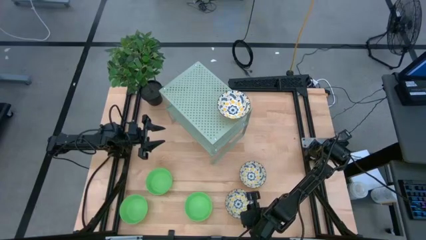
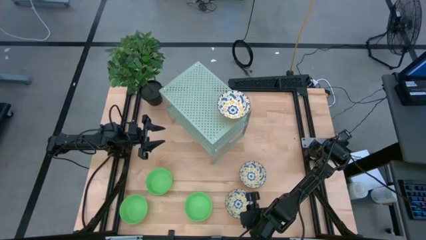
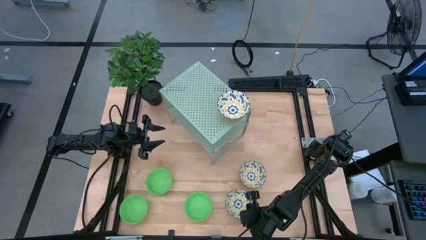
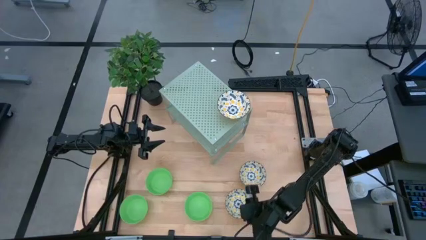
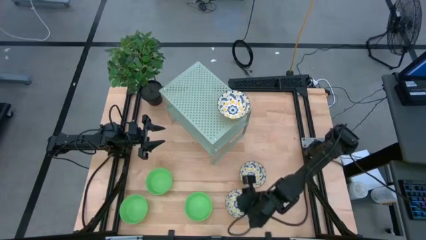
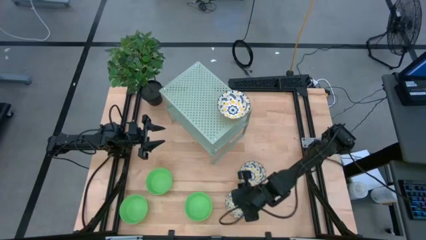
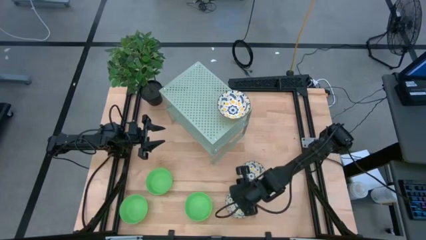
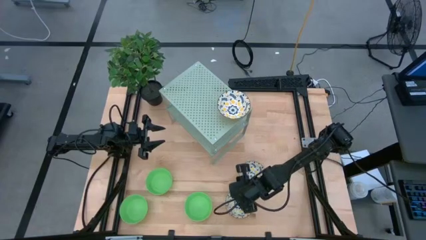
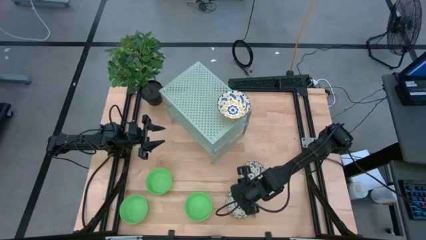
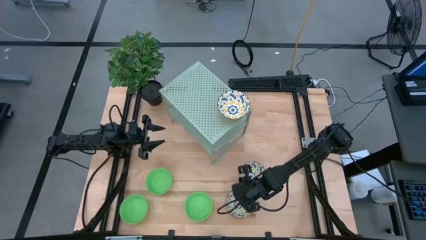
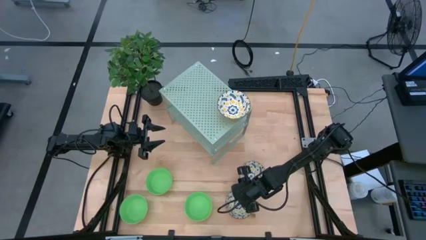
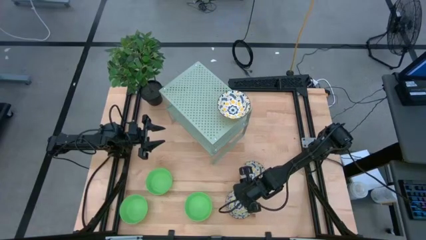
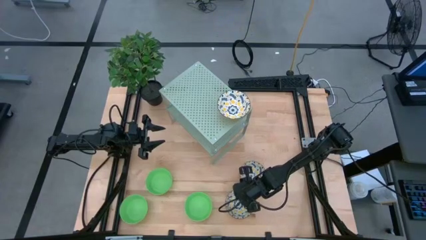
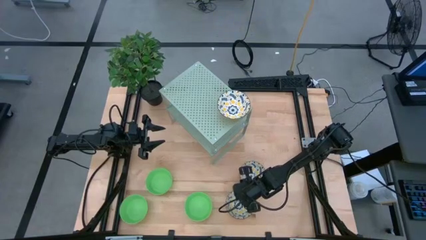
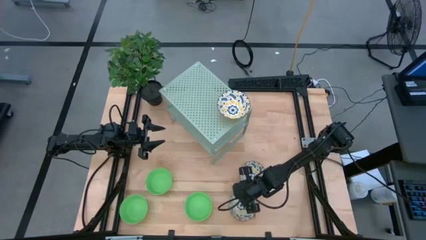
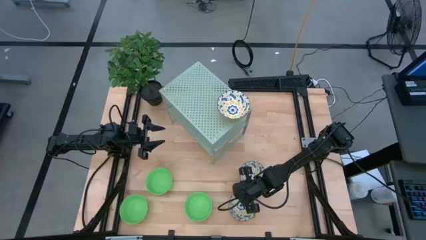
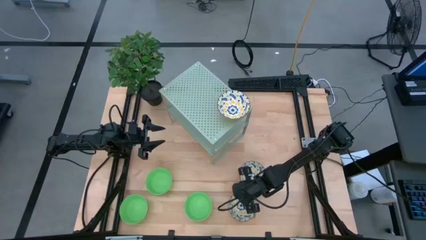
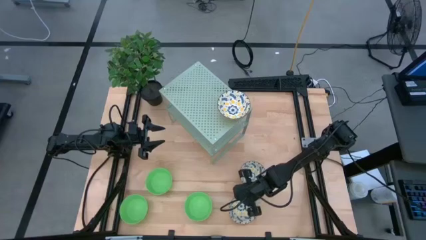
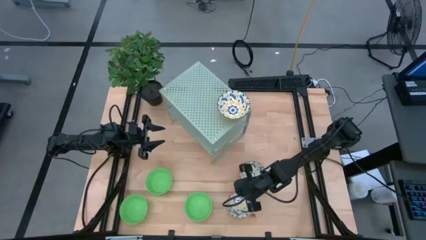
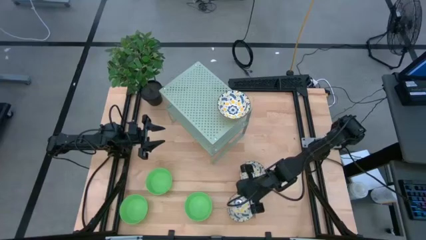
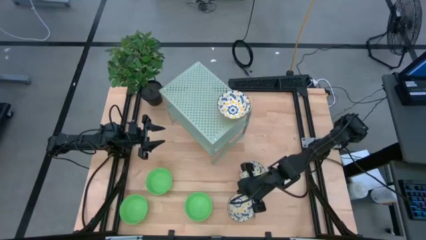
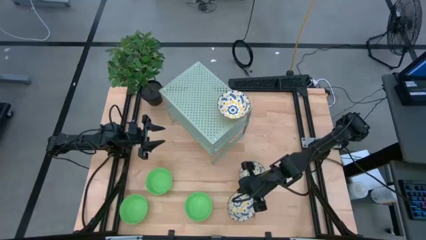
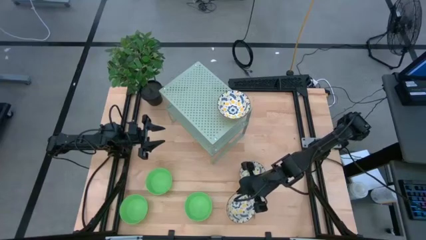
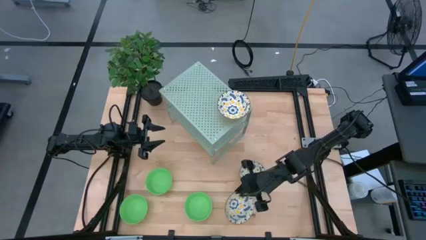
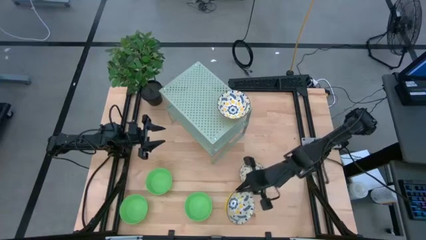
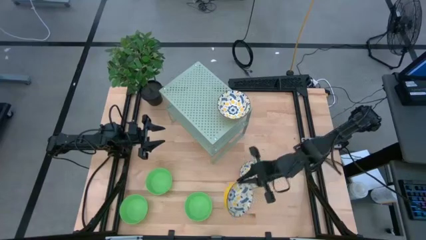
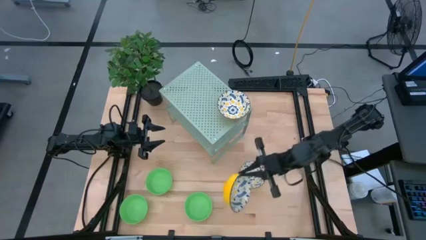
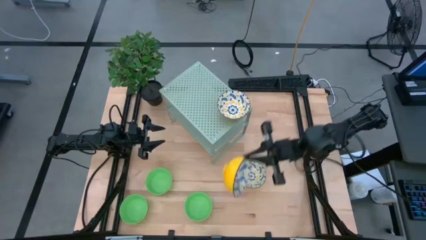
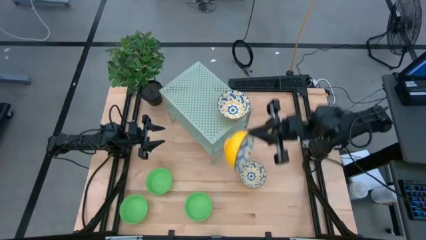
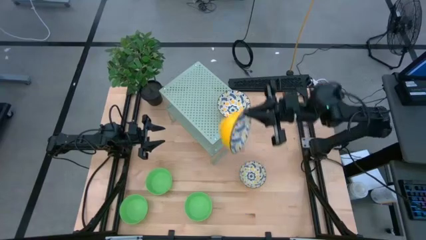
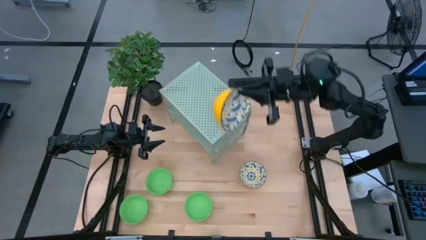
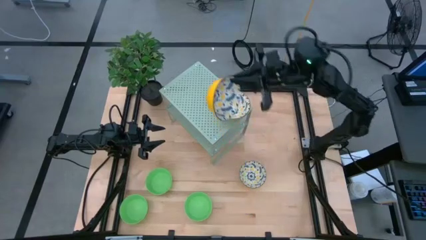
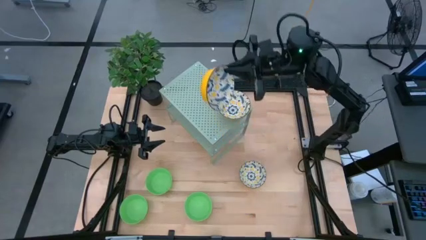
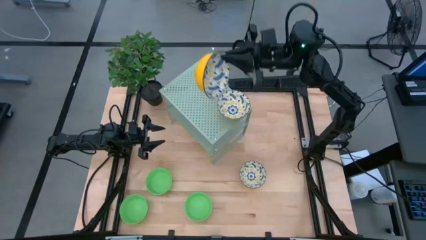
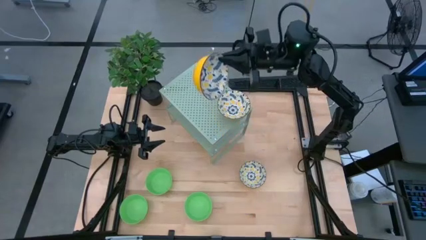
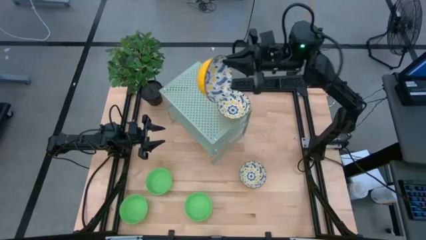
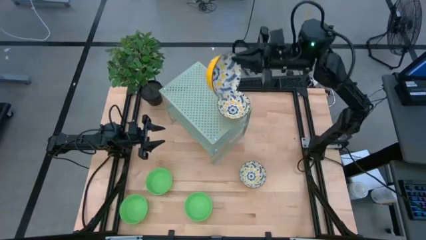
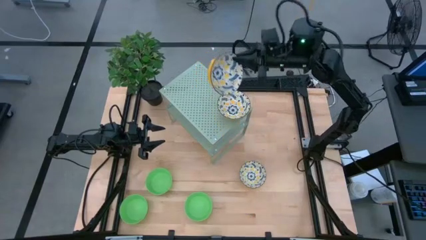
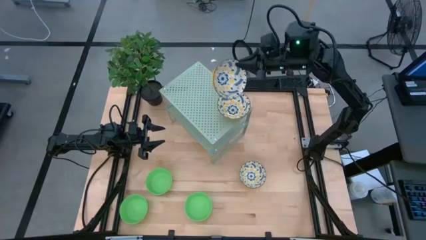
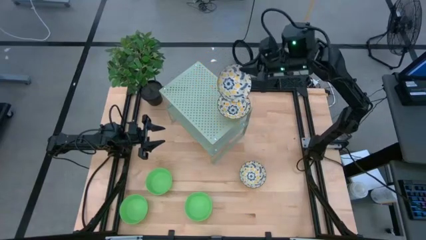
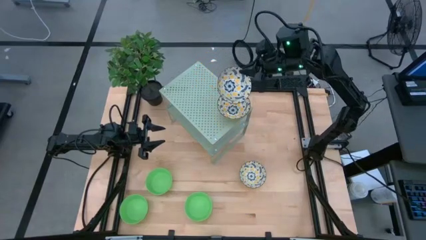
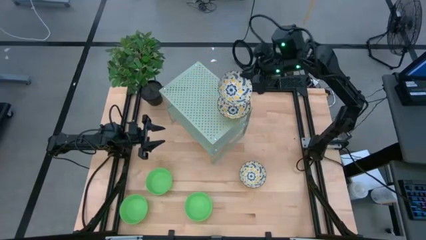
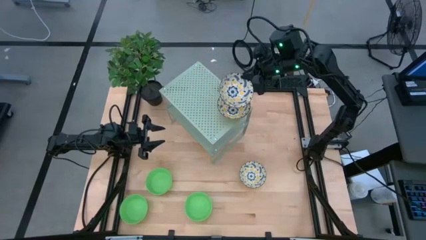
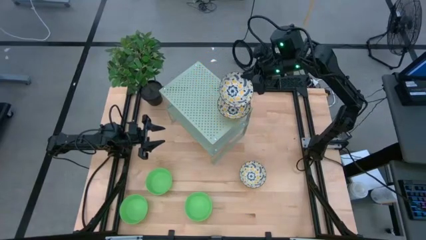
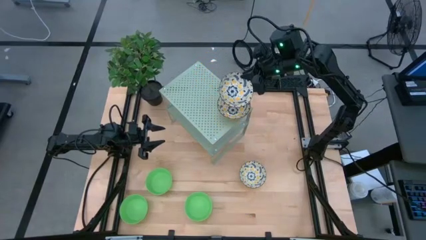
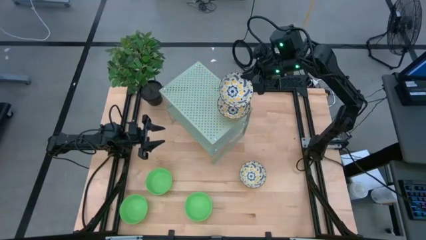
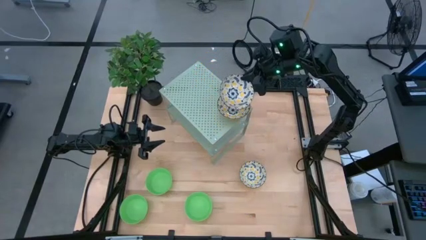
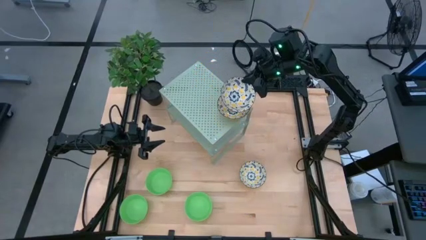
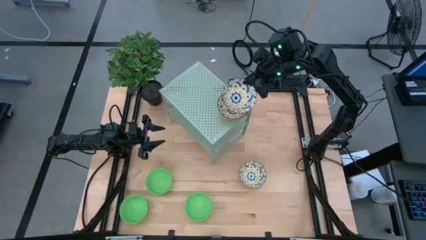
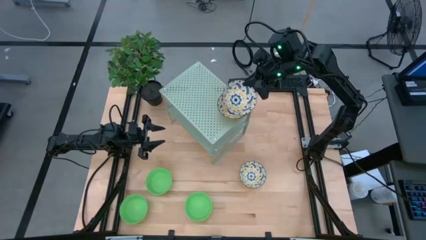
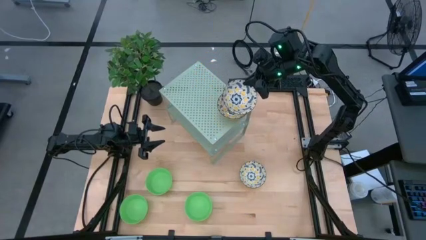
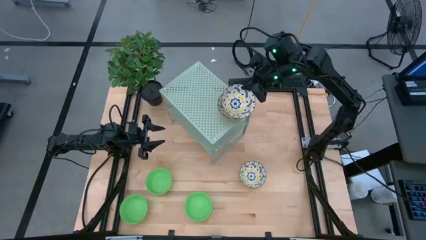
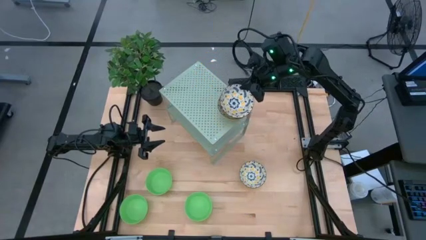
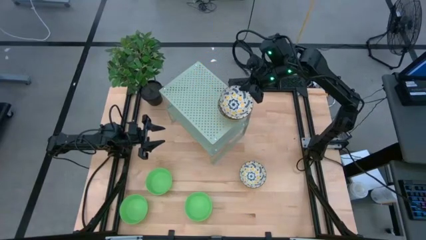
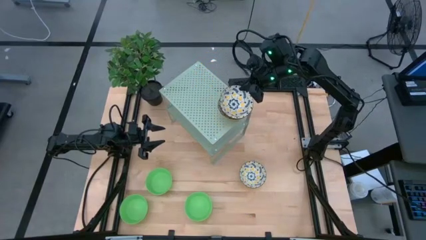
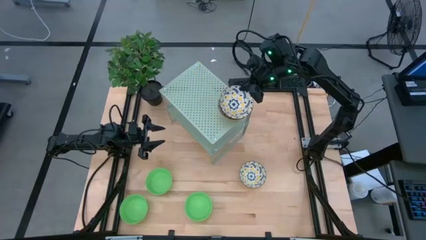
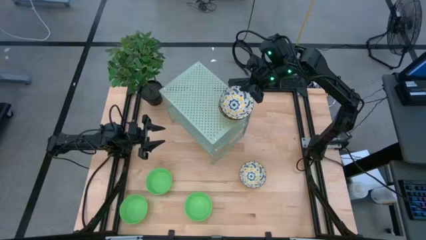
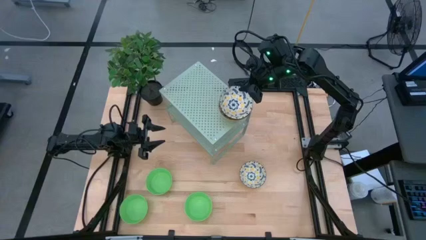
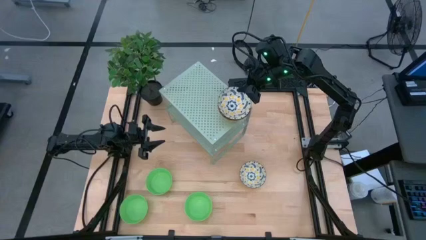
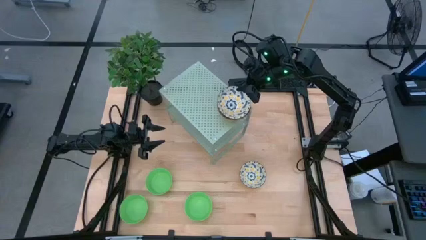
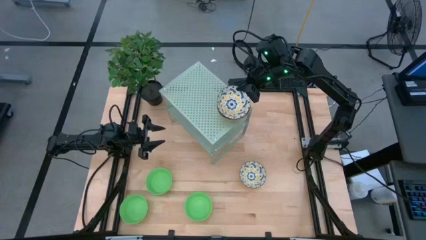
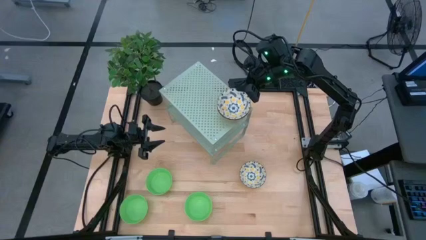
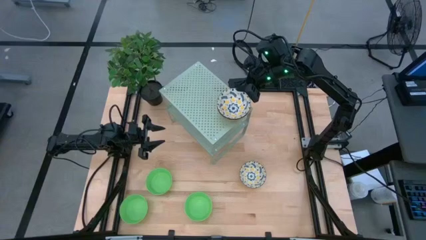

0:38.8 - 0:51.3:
Task: Pick & Place Mini bowls
Stack the bottom yellow patterned bowl on the yellow patterned bowl on the shelf

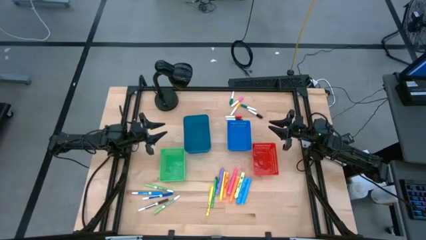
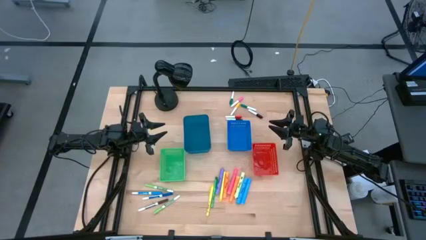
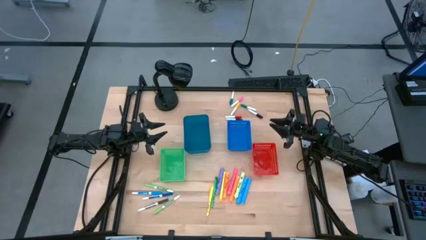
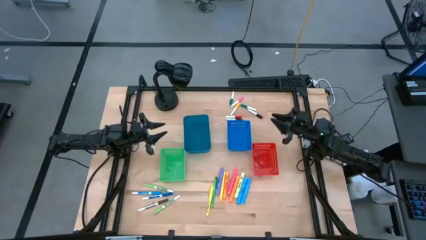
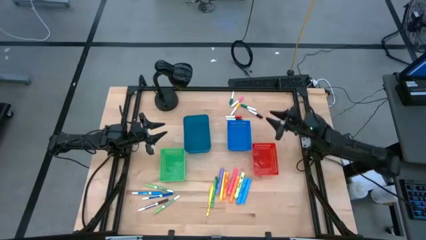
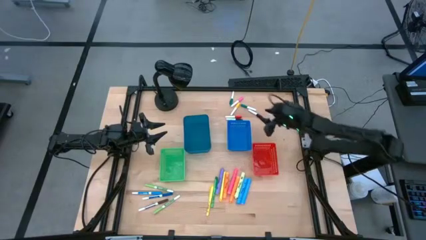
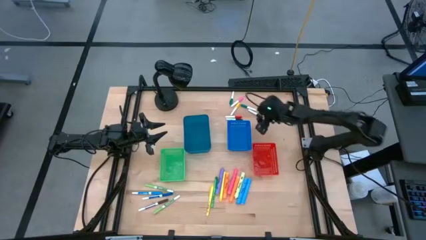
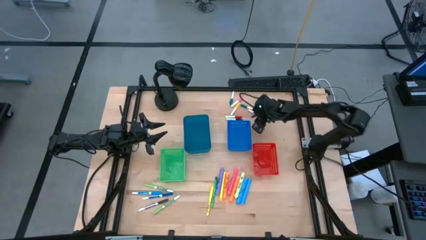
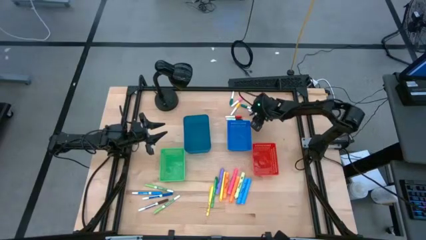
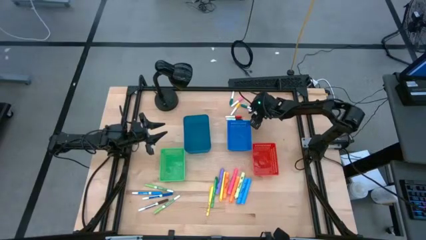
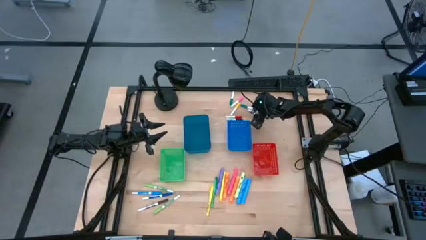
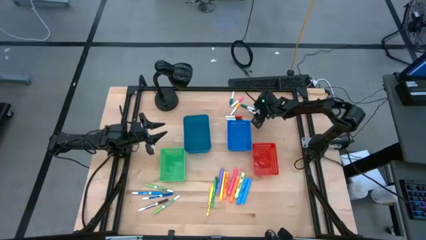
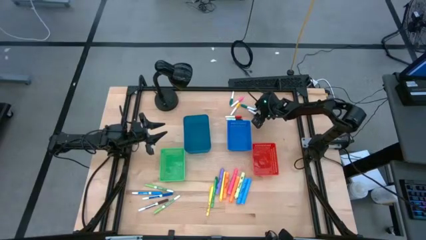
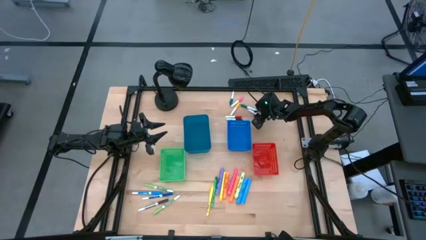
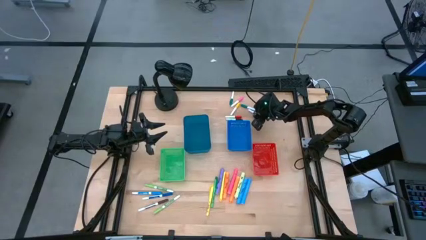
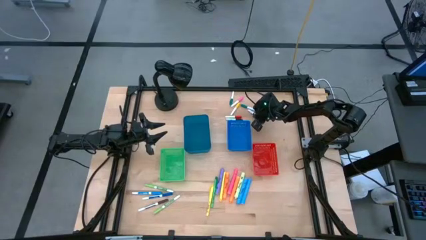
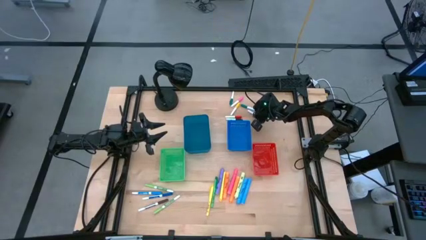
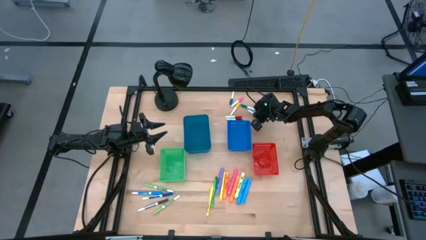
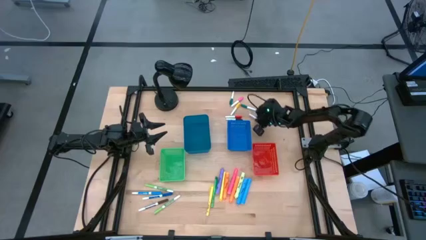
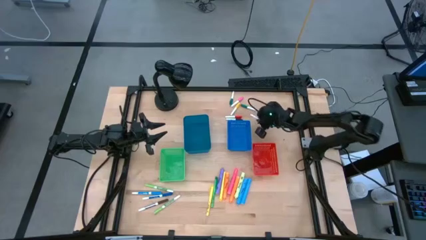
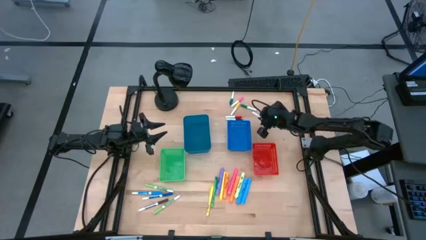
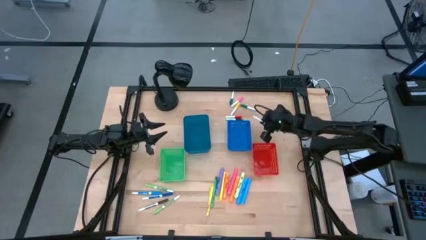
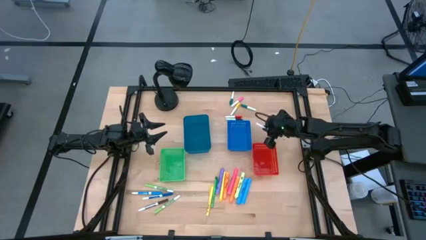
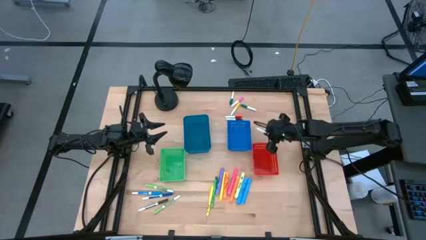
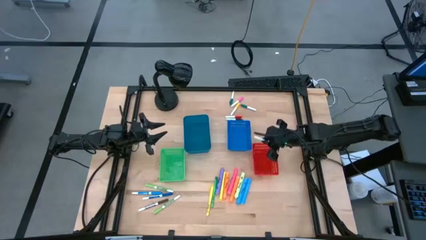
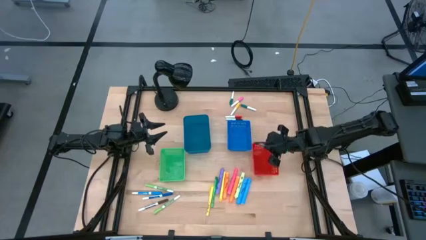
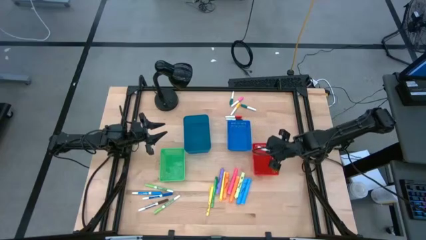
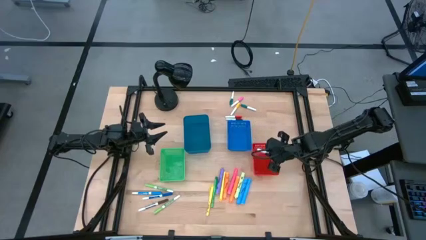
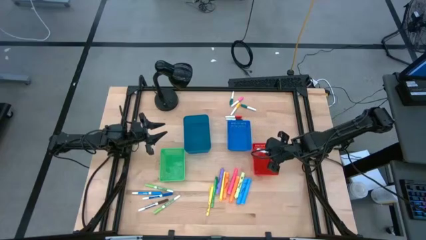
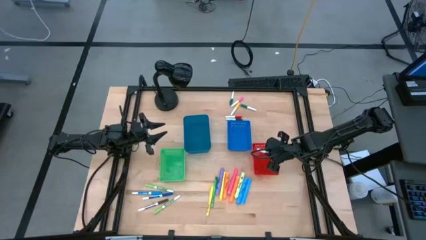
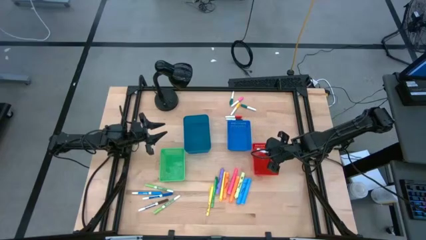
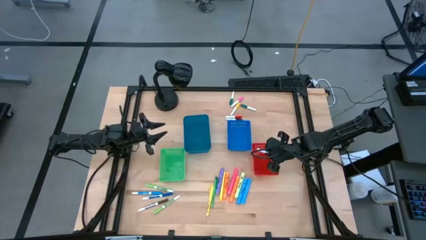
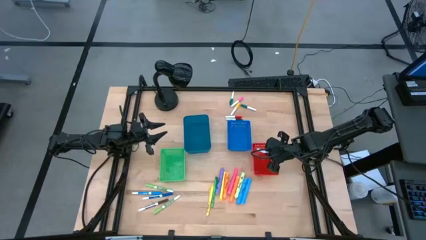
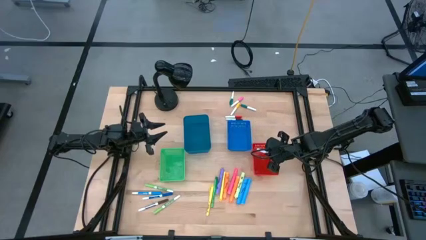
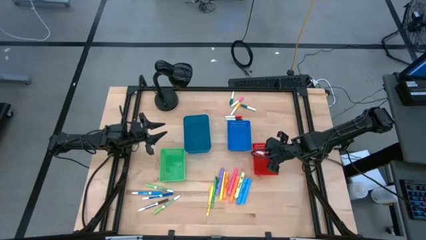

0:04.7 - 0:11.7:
Task: Pick & Place Markers
Put the right black highlighter pen into the red bin
